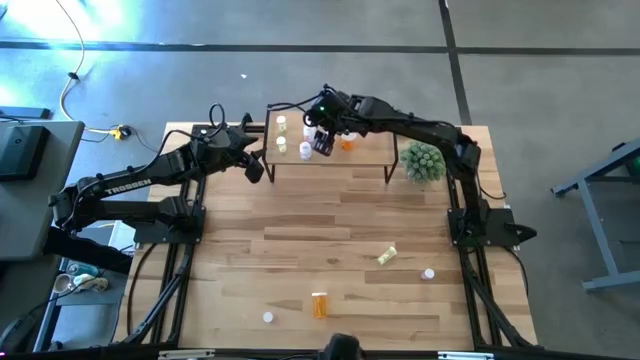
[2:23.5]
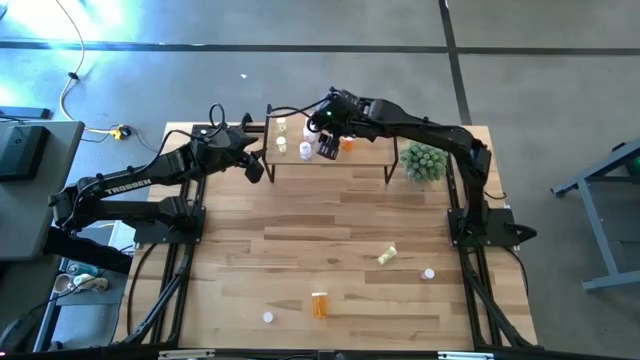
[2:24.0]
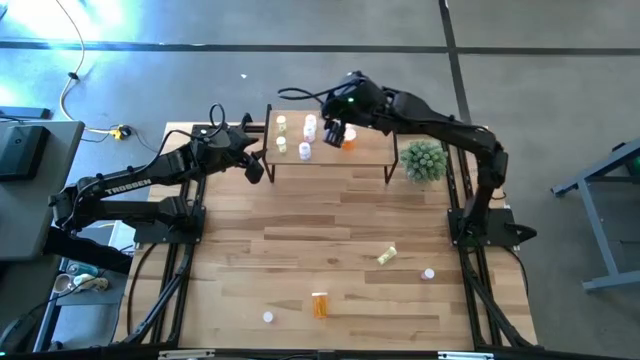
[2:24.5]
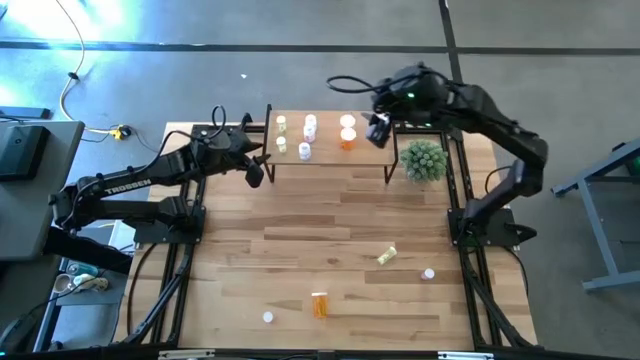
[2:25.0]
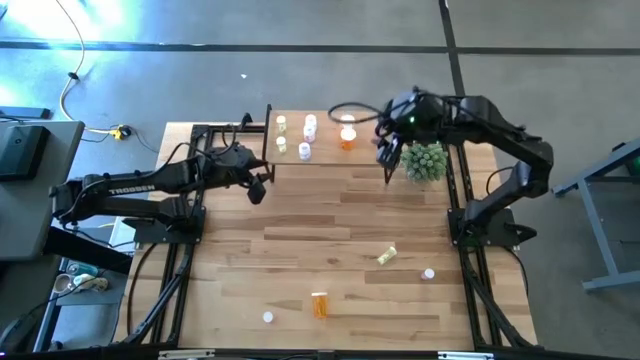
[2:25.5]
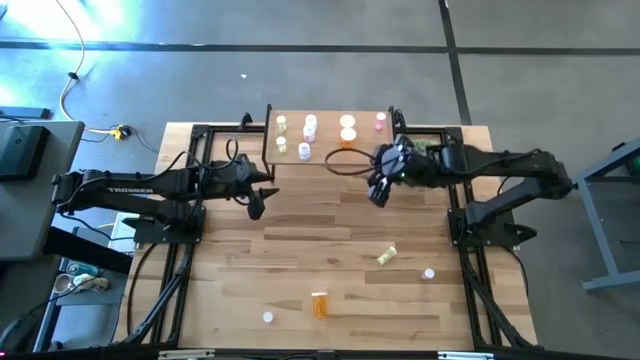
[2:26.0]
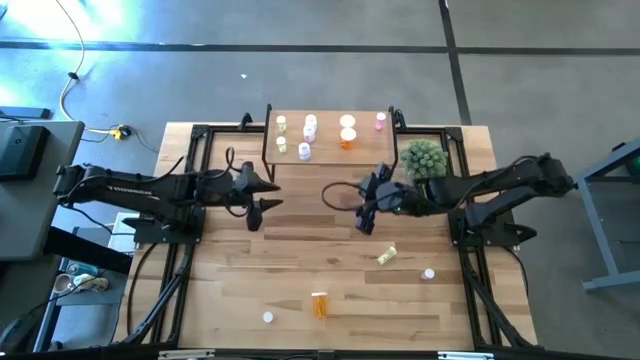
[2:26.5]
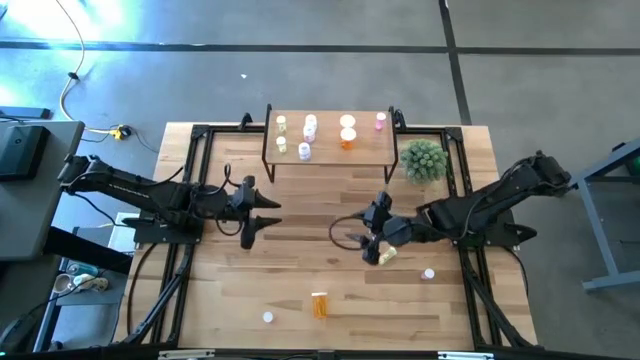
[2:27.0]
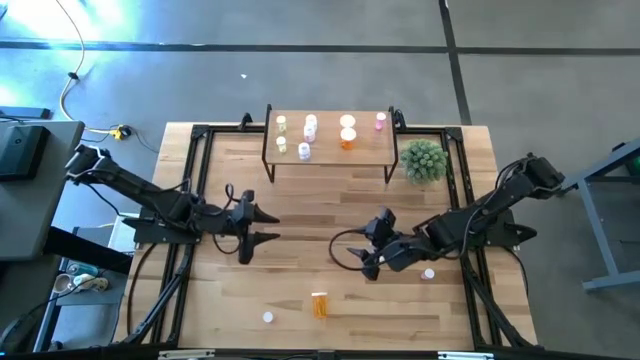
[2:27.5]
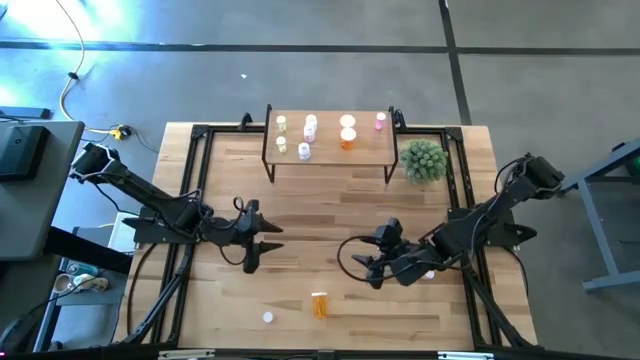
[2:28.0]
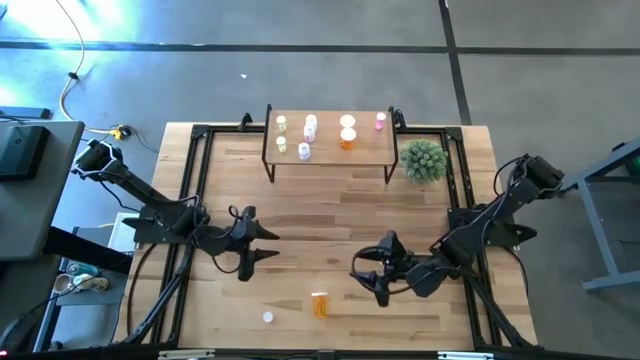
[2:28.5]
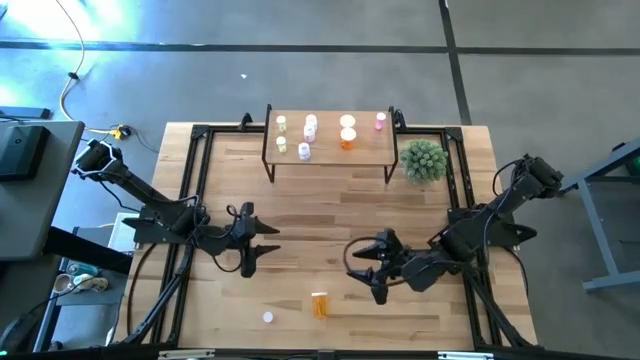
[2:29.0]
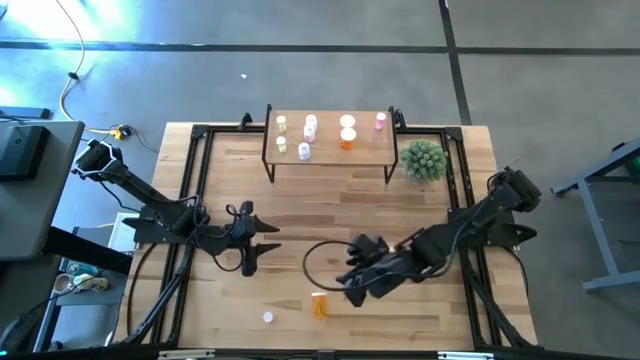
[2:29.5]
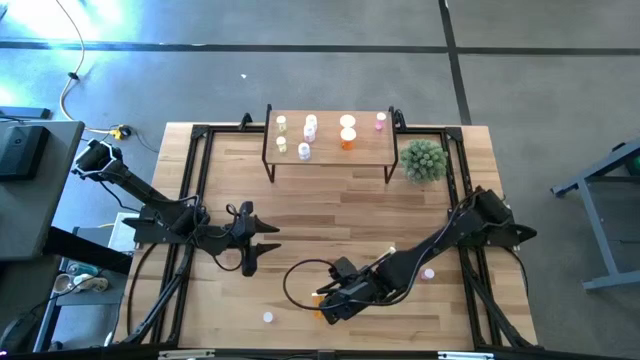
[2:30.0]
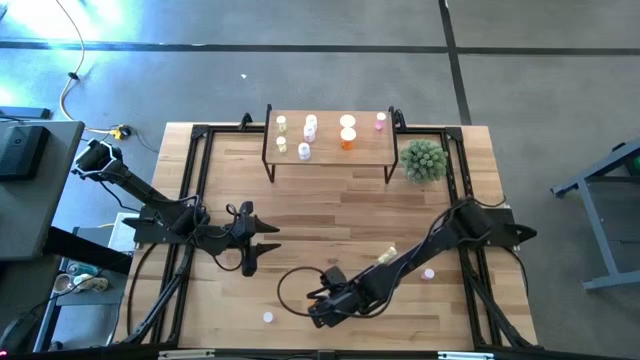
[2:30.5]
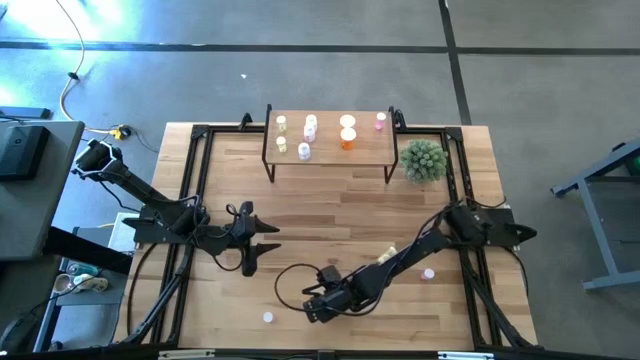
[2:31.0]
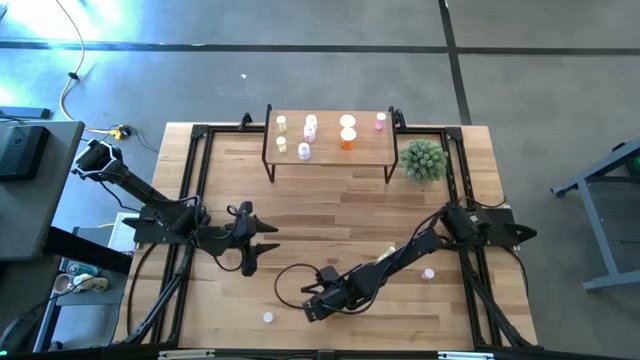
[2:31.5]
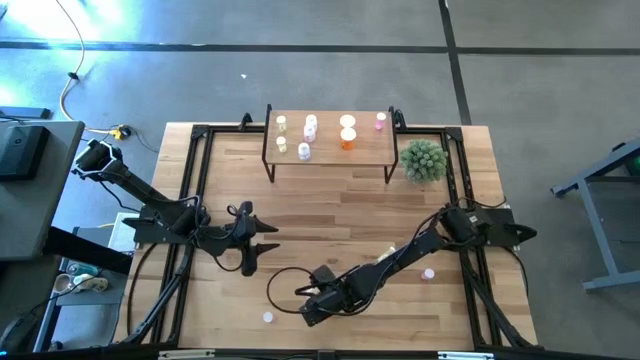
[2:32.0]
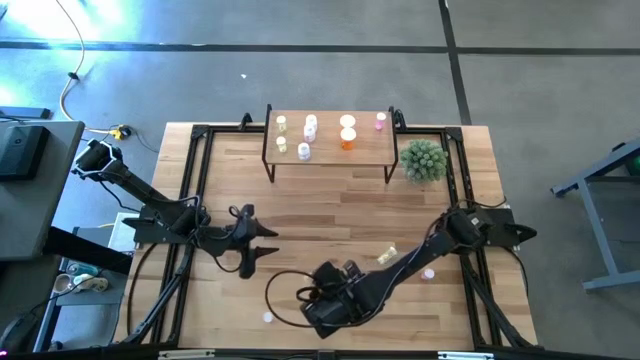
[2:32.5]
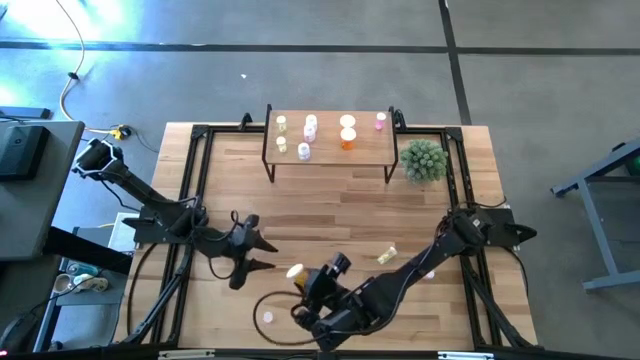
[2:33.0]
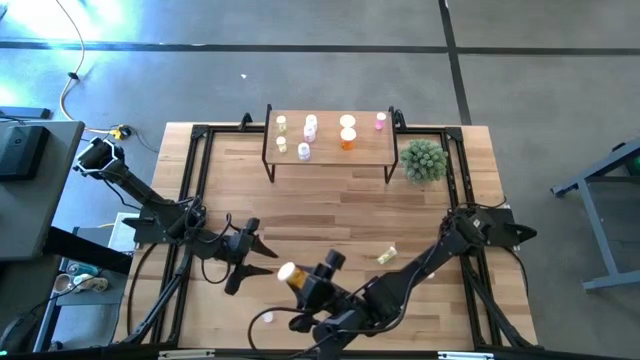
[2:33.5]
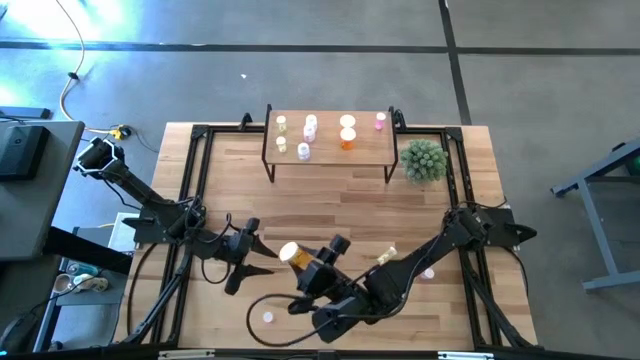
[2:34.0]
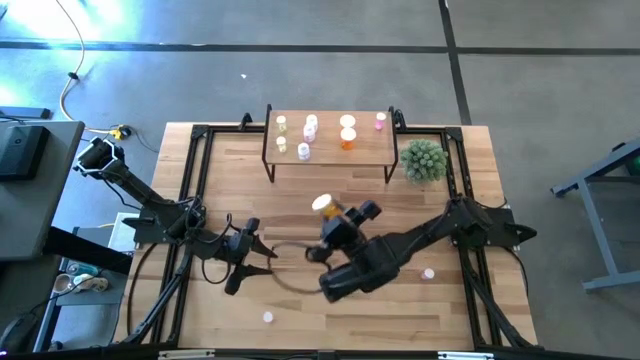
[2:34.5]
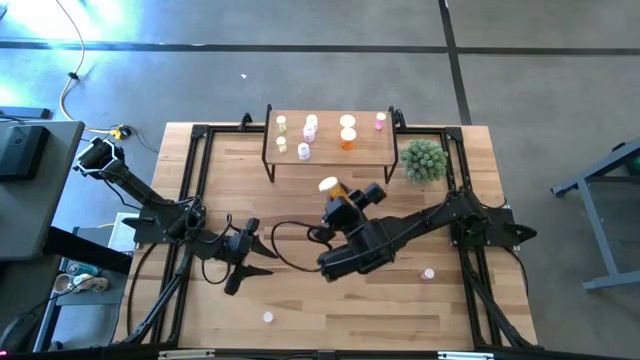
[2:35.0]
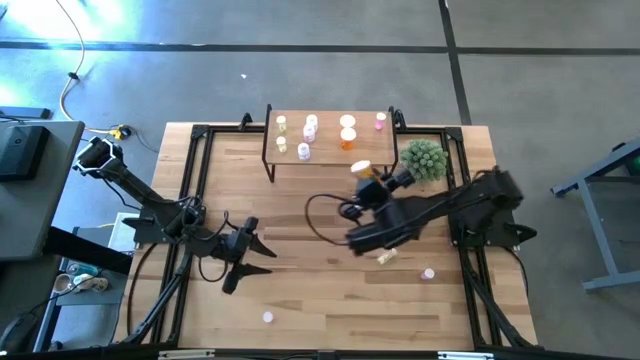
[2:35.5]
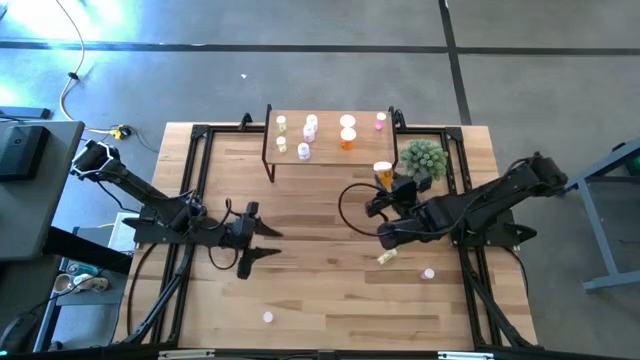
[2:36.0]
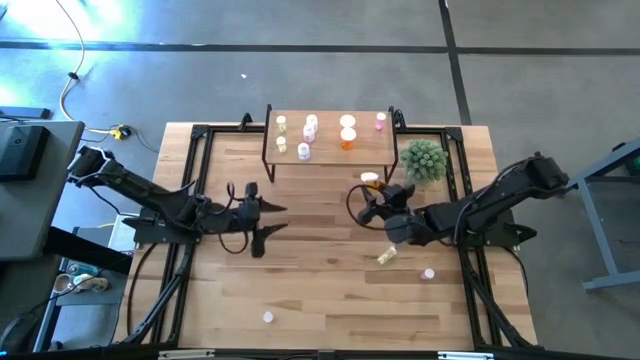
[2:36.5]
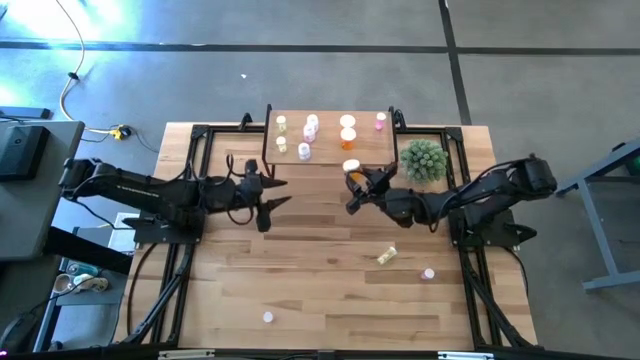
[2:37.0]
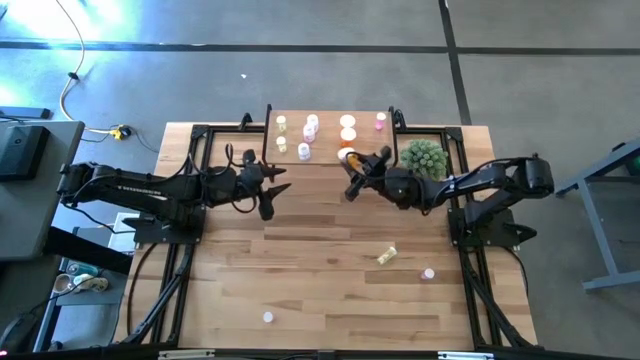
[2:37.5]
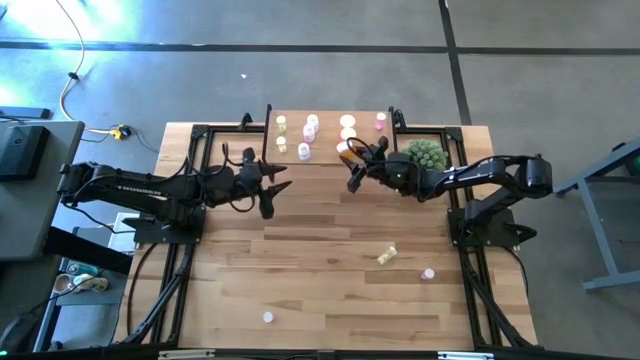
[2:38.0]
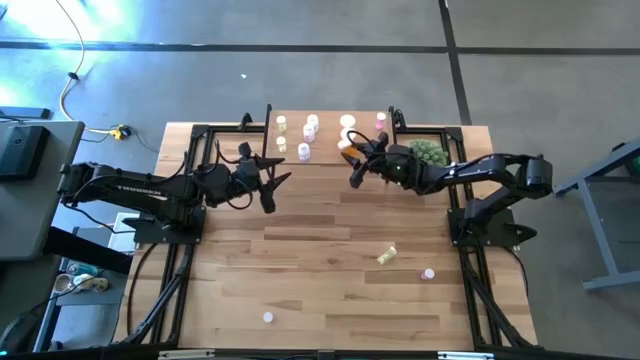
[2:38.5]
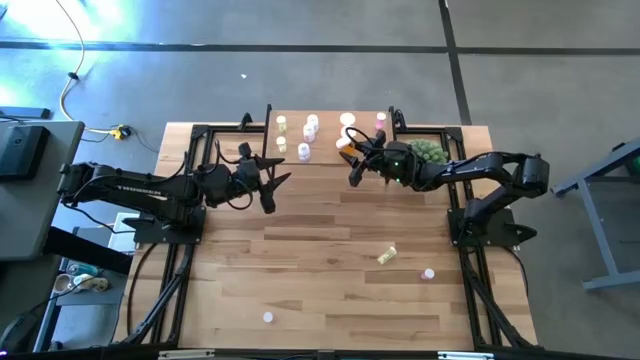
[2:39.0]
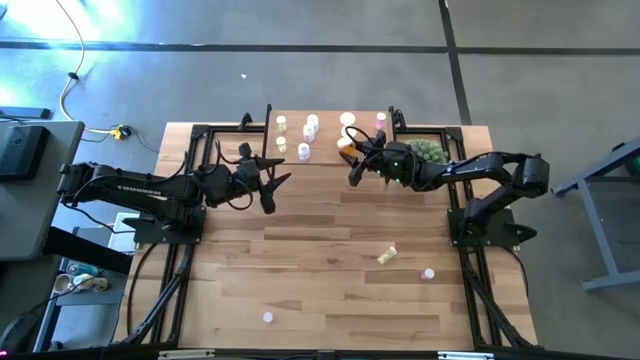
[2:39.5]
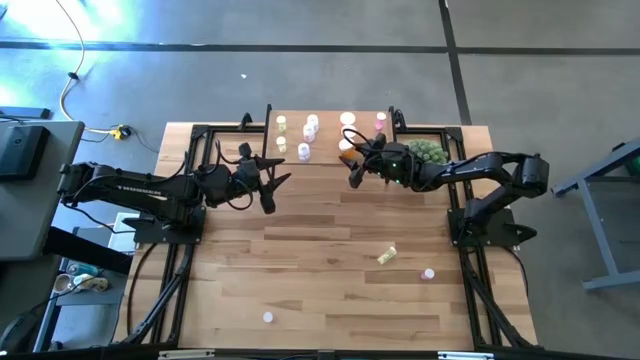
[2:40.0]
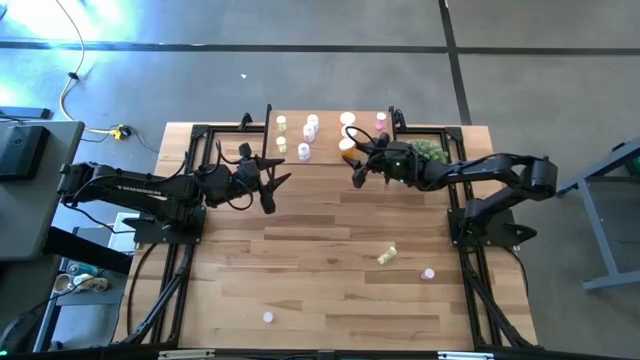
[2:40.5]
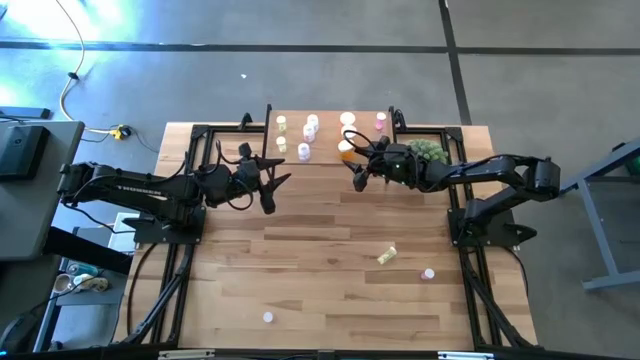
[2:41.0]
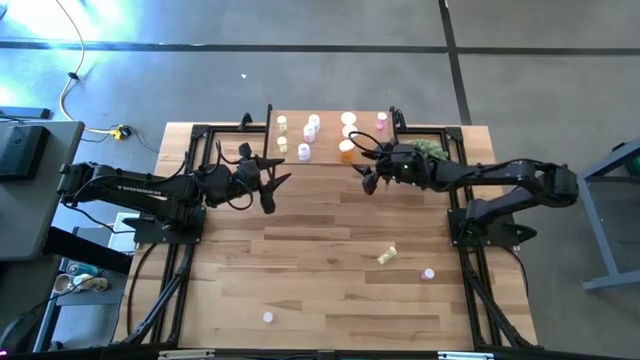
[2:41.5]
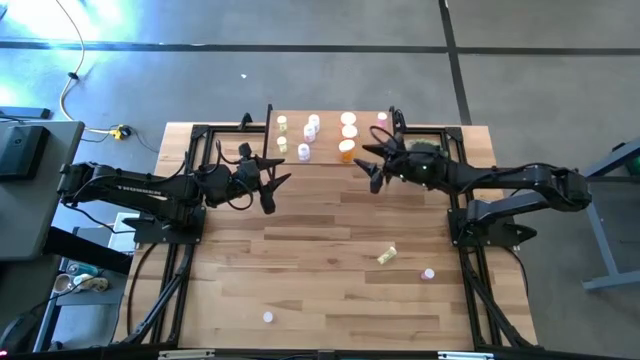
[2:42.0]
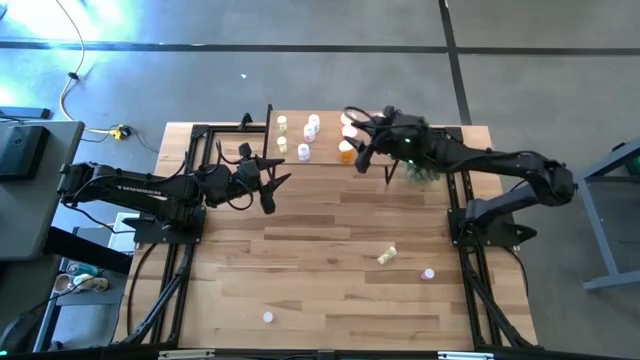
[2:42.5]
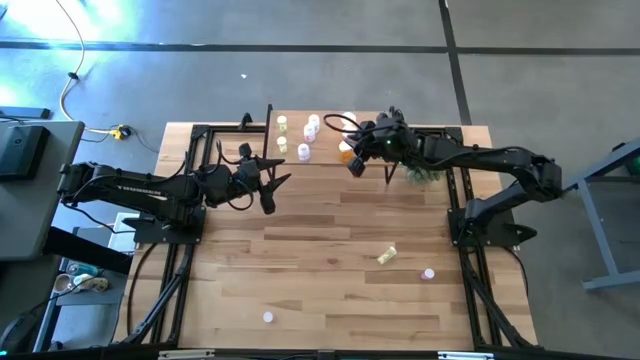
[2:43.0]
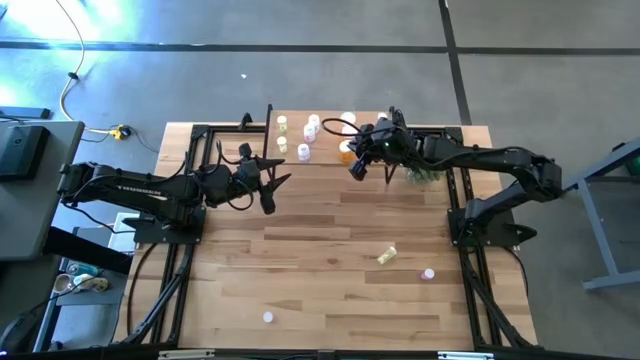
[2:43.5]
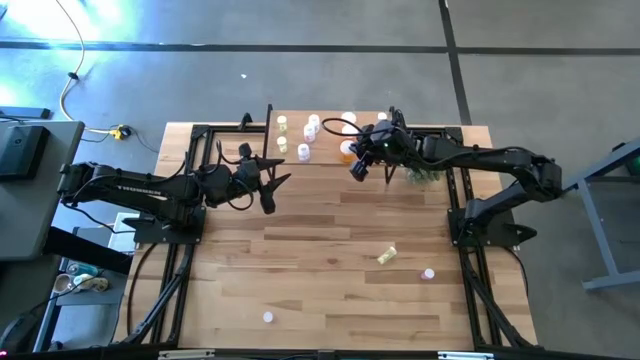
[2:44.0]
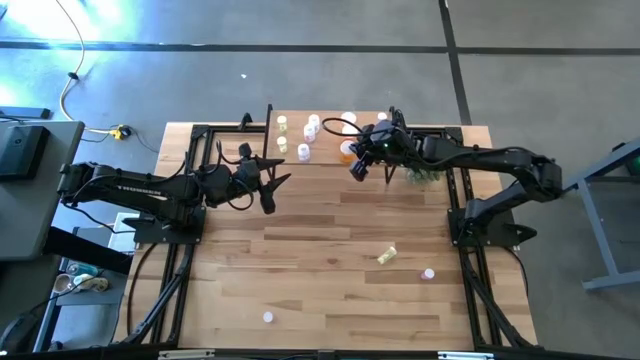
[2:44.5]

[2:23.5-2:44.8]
Task: Pick and place medicine bottles onto shelf by color
Put the orange pill bottle aligned with the other orange pill bottles on the shelf
